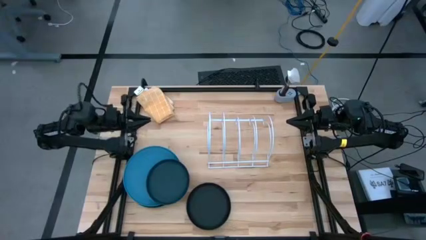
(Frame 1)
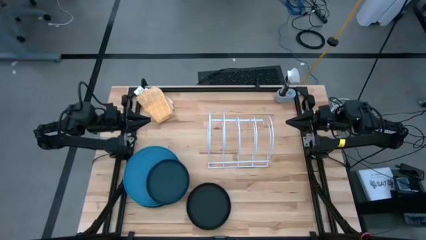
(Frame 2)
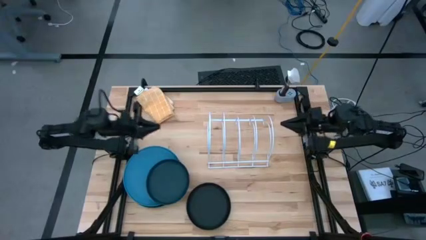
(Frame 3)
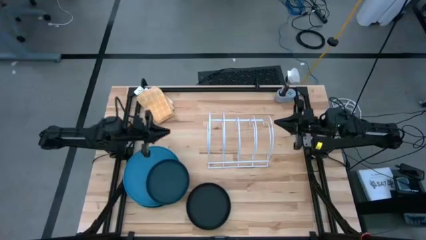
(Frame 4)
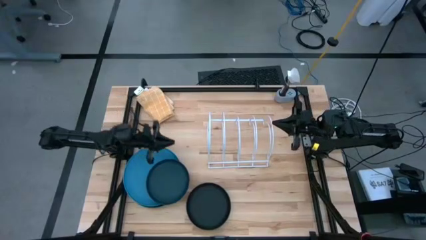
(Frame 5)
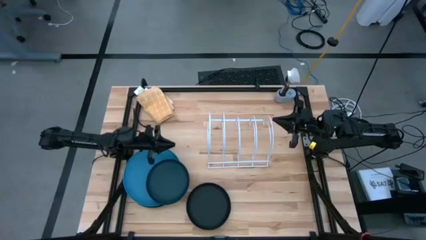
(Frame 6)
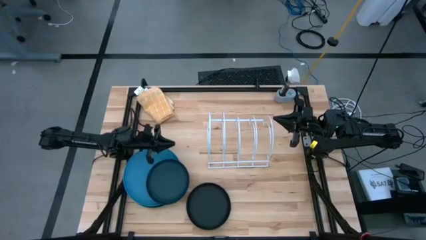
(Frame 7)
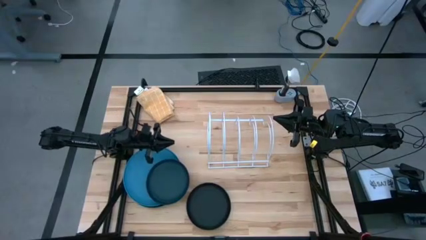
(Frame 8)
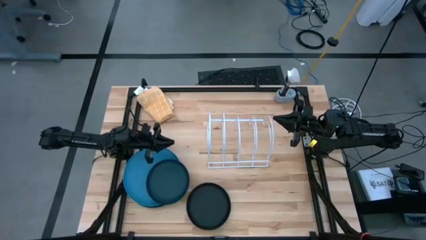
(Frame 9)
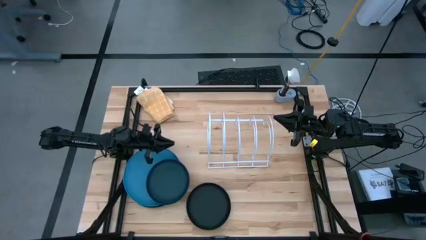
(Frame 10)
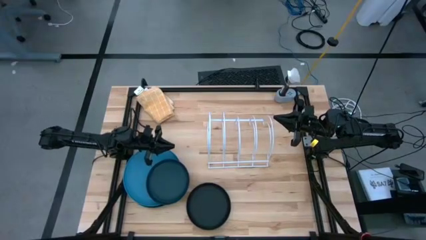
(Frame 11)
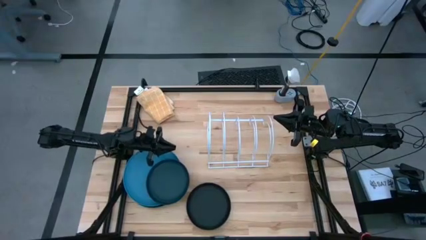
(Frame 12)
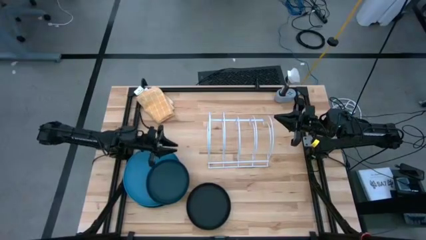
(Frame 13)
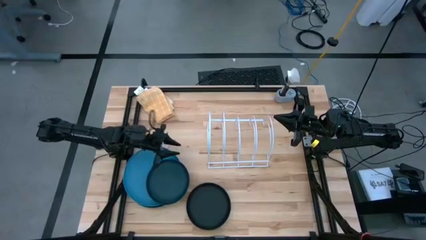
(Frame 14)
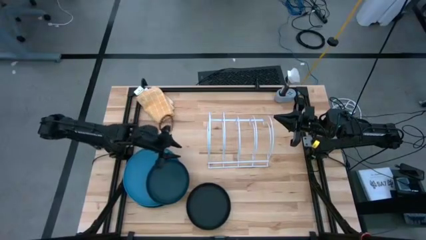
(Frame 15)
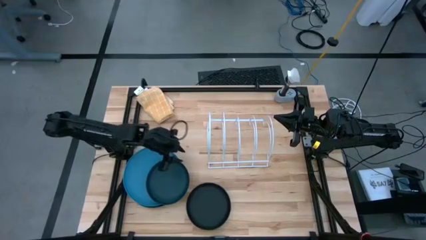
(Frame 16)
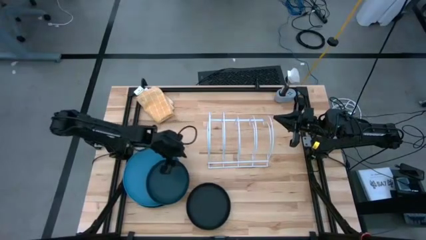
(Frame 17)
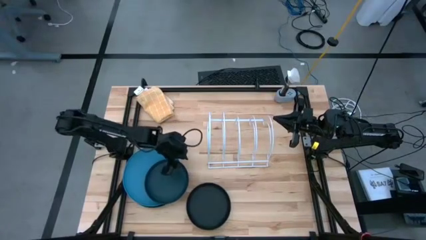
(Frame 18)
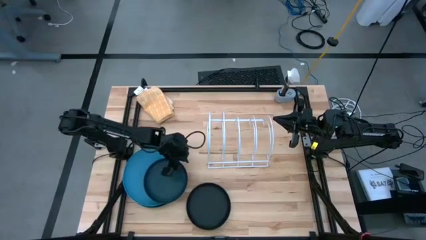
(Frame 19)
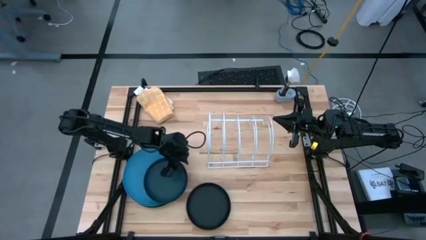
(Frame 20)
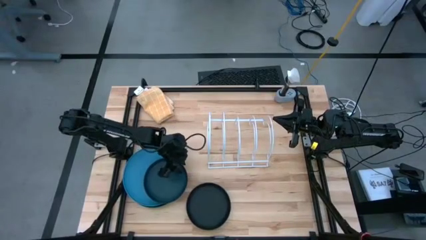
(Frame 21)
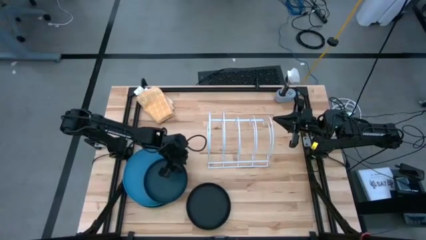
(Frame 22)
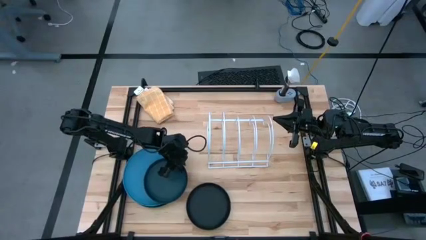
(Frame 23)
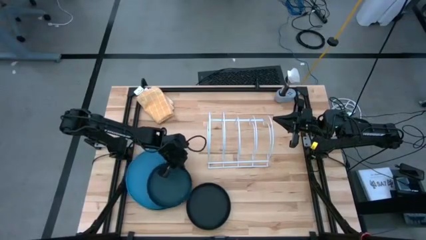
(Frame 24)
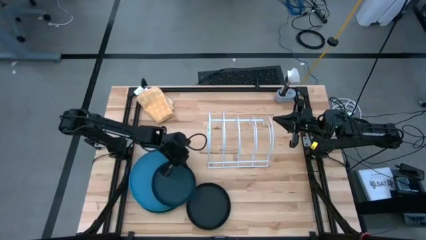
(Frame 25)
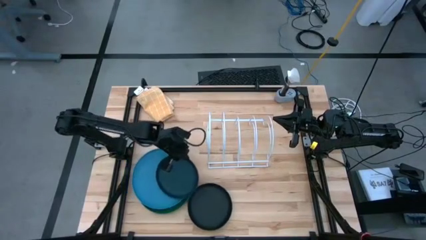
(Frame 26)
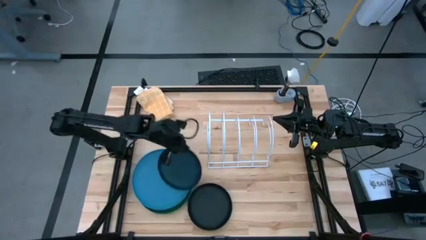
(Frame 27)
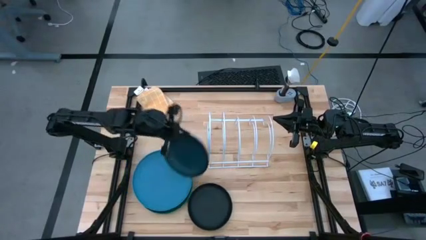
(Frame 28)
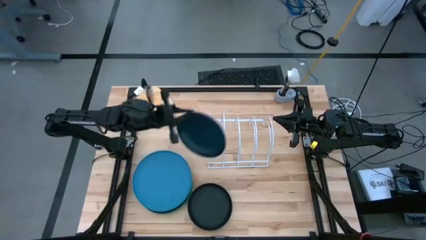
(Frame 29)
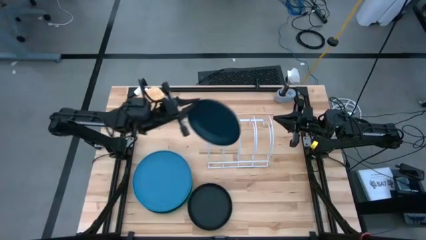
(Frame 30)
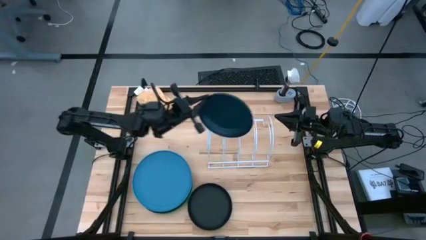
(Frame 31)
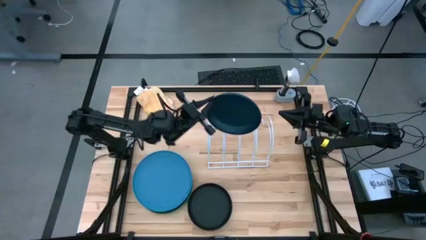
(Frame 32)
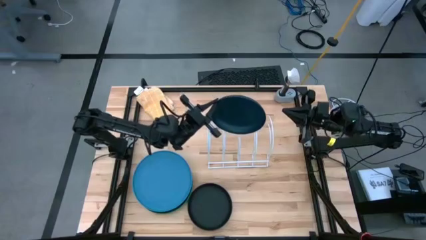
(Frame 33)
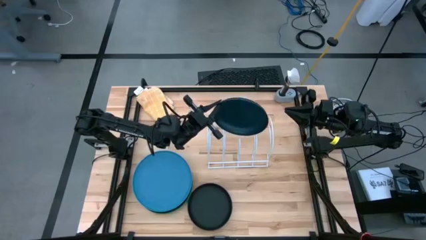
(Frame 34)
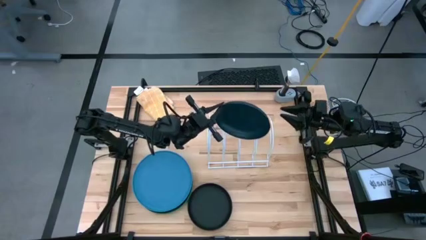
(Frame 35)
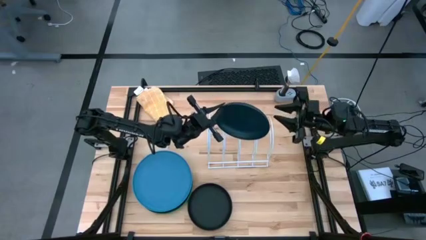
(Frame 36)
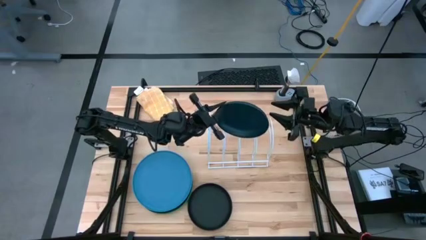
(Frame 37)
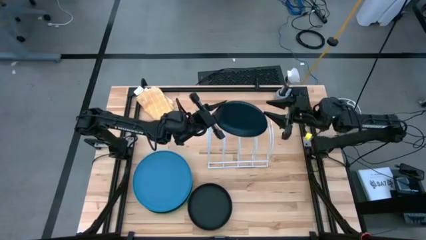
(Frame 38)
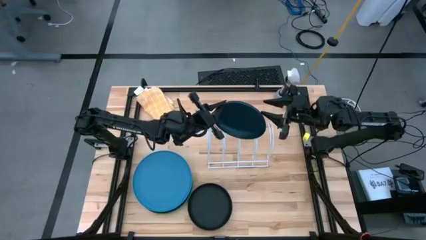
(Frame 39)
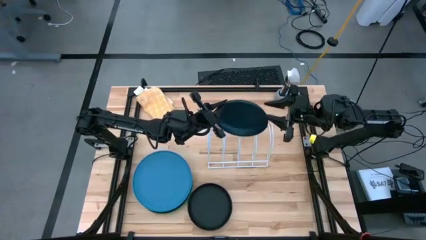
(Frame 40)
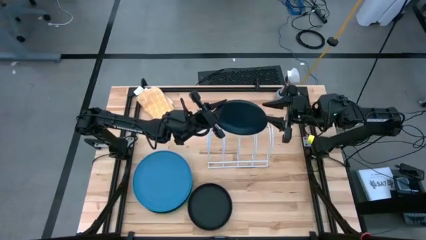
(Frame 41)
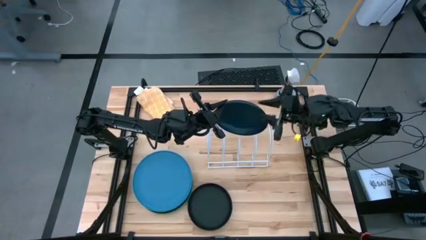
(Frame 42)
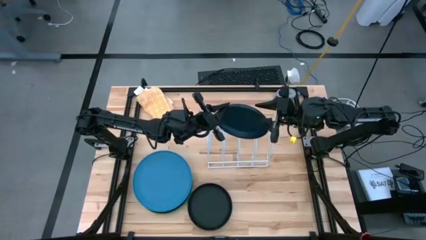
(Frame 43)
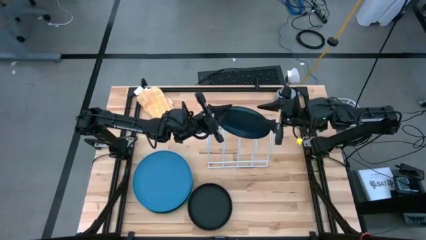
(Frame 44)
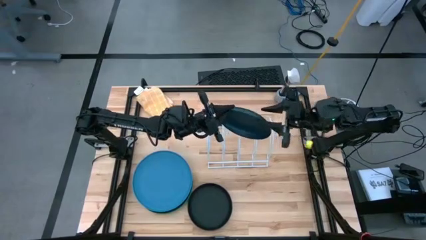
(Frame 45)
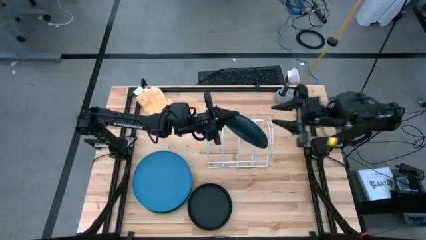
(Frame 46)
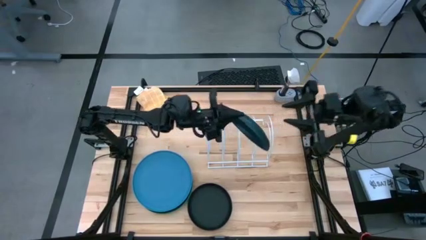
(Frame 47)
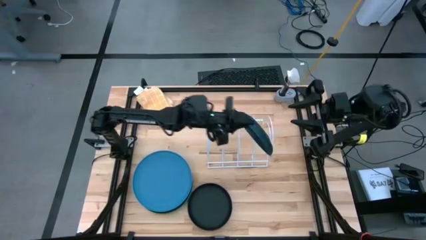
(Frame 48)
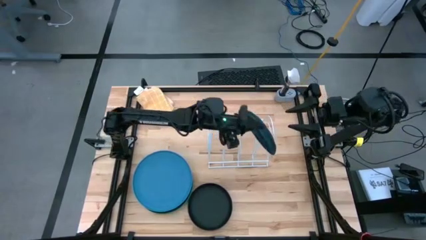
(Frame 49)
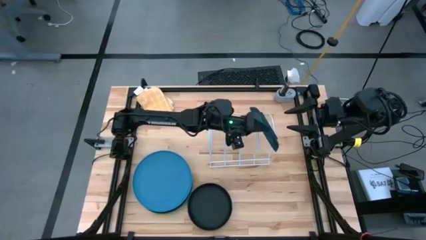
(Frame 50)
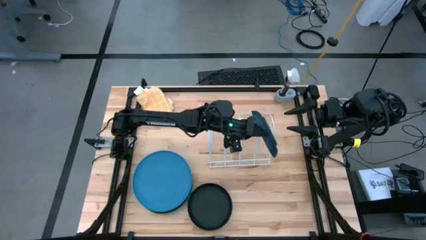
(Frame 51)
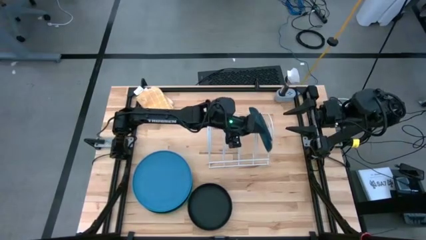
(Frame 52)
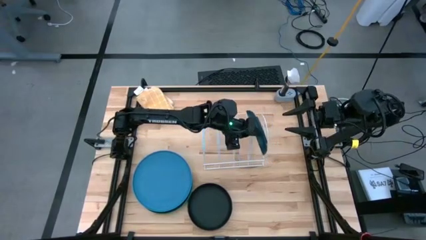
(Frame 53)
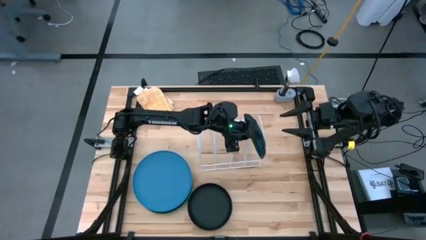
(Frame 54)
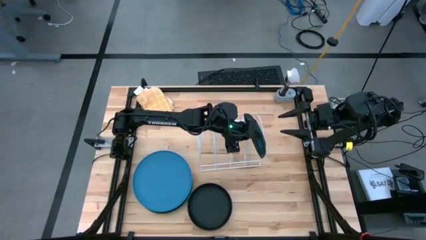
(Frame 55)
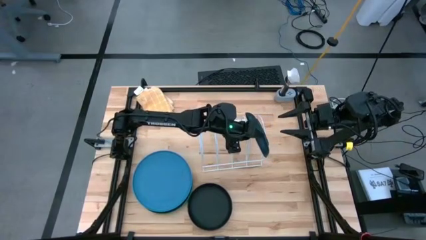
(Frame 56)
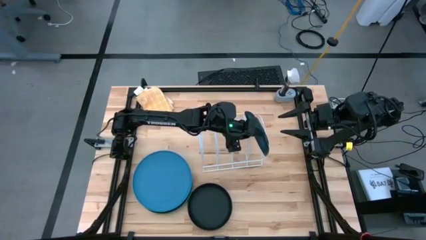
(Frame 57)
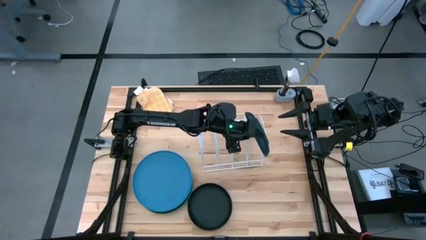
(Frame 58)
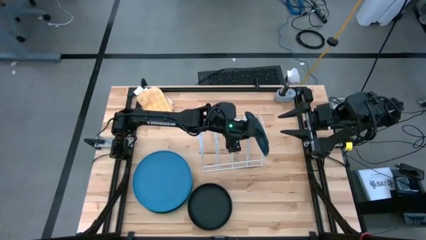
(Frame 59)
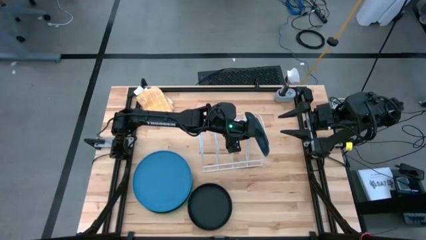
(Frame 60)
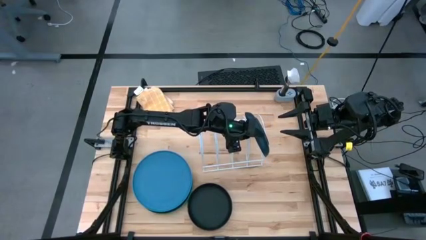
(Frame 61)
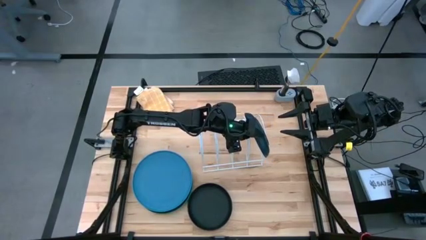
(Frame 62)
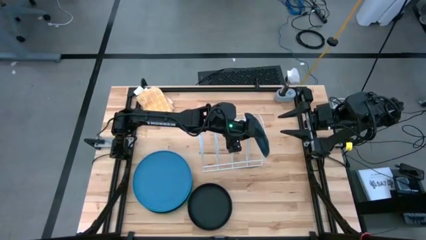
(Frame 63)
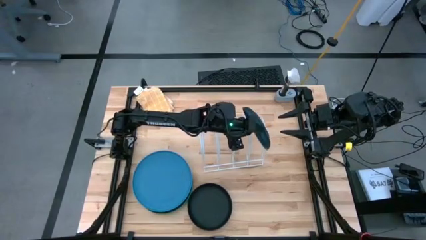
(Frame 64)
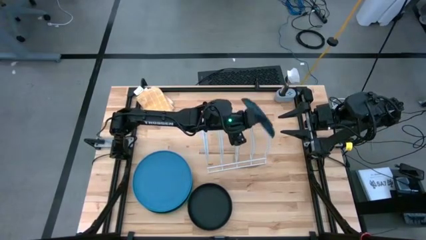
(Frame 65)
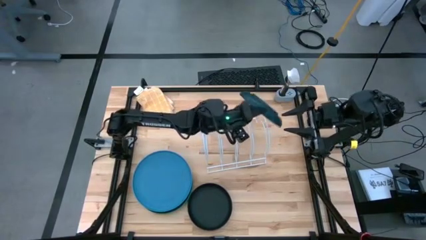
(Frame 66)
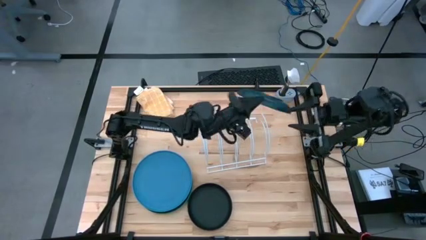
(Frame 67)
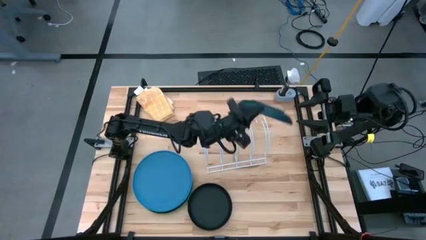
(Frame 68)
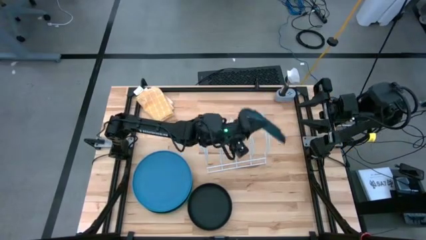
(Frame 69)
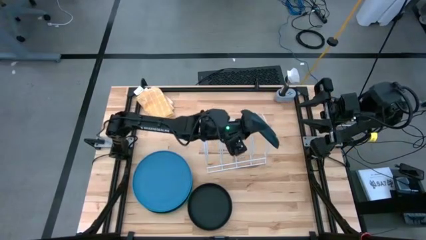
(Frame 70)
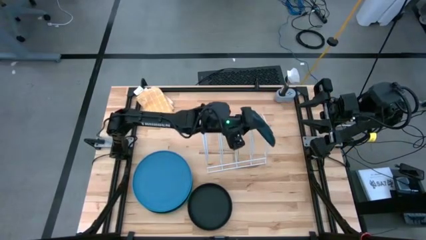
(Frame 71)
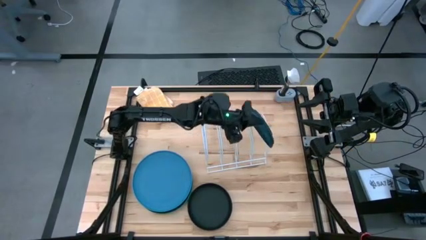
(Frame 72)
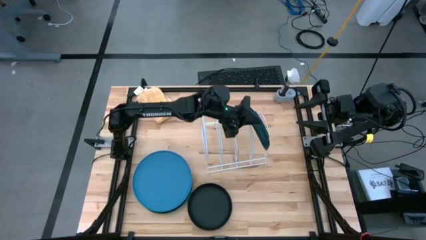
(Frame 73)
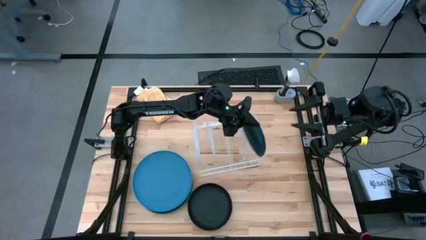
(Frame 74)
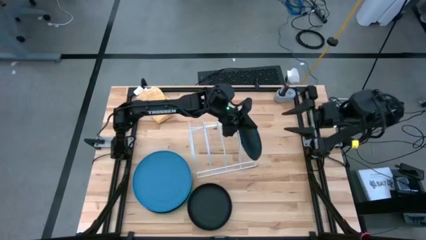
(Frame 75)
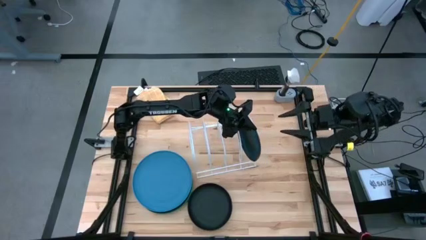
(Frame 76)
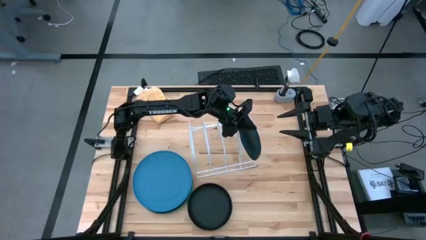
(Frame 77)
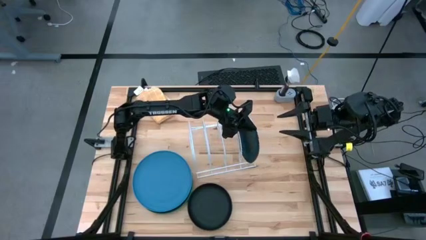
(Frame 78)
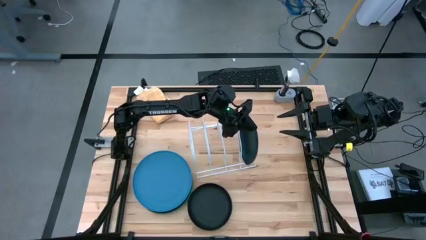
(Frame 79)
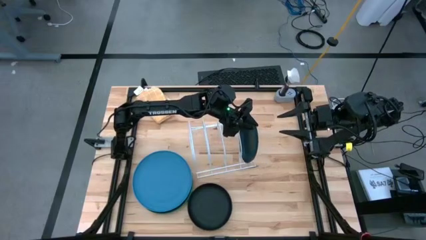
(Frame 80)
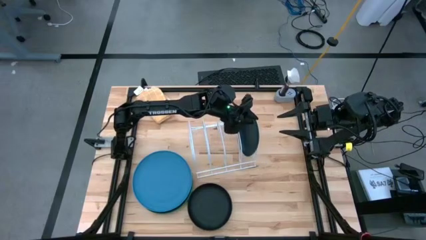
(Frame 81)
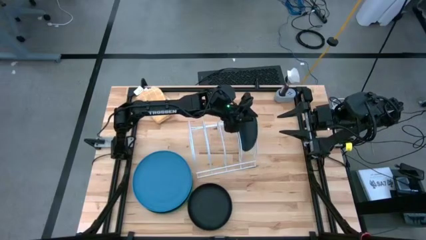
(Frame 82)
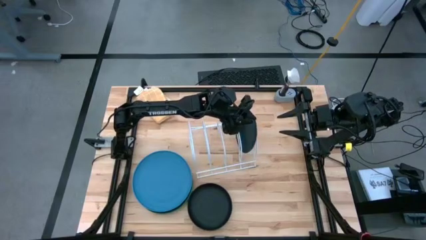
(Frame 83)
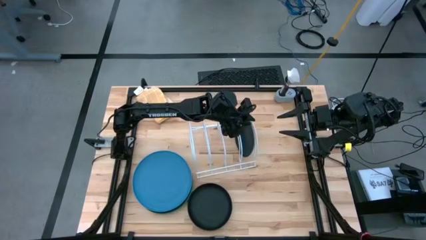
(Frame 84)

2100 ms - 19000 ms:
Task: Sort dishes
Put the dark green plate into the dish rack
